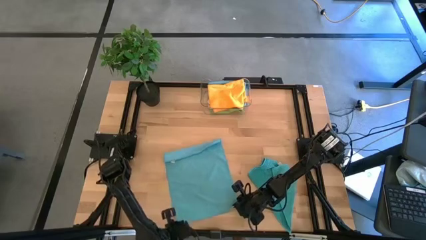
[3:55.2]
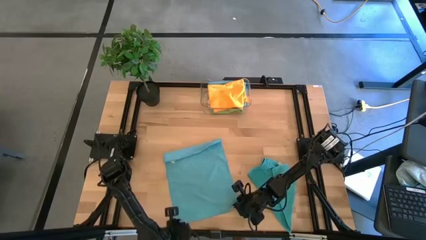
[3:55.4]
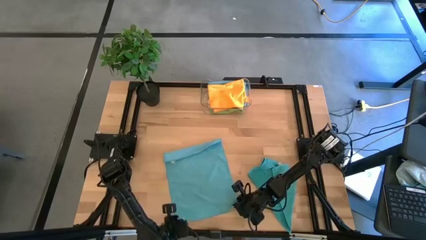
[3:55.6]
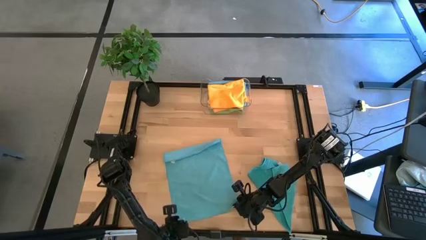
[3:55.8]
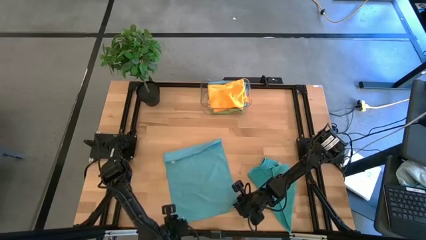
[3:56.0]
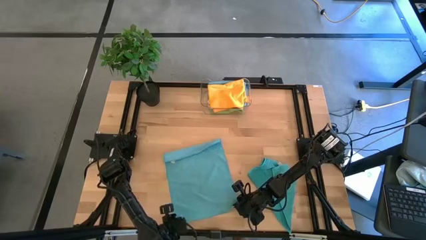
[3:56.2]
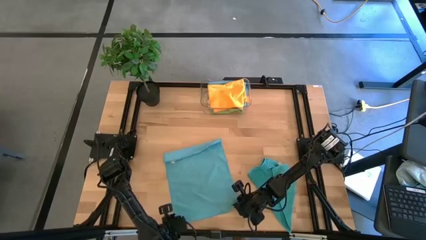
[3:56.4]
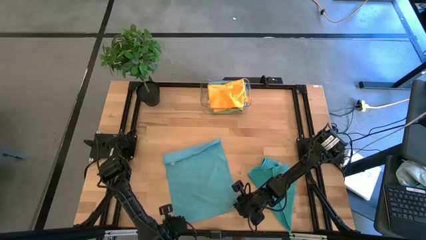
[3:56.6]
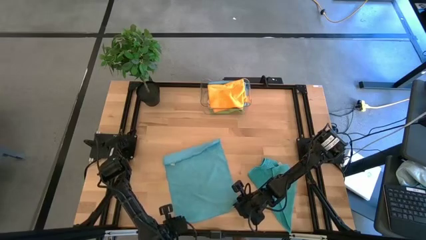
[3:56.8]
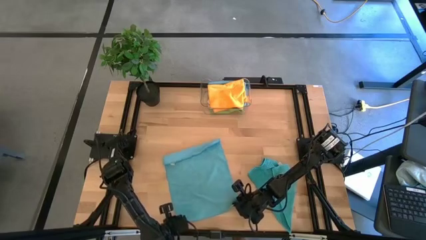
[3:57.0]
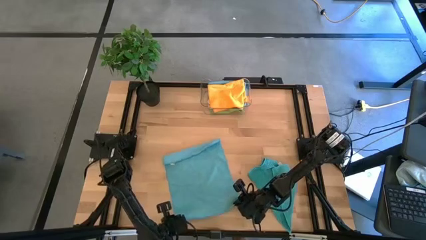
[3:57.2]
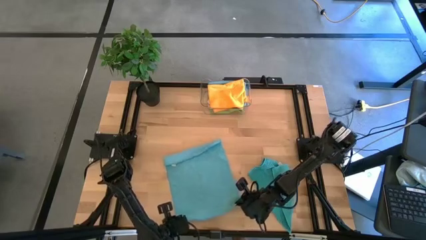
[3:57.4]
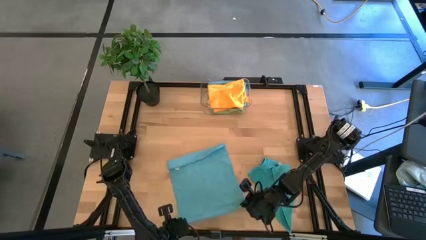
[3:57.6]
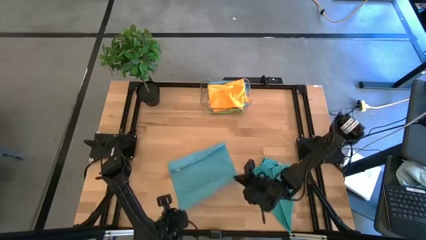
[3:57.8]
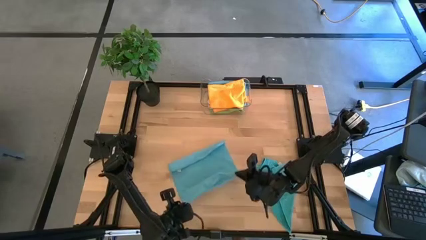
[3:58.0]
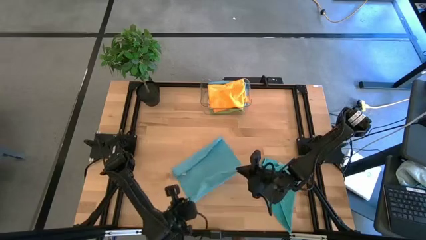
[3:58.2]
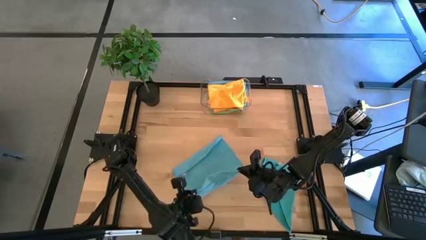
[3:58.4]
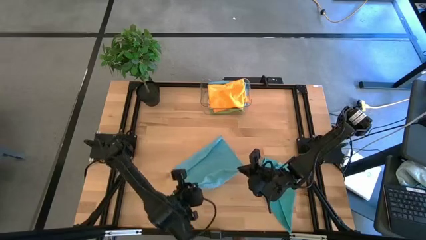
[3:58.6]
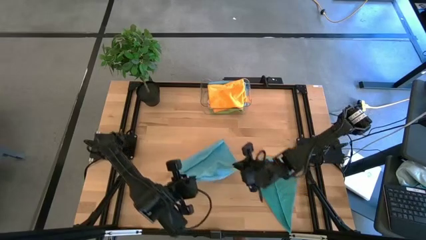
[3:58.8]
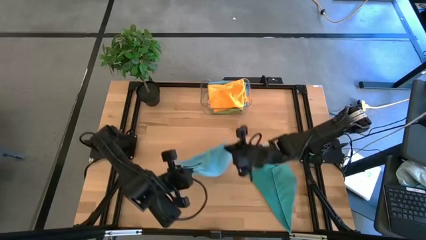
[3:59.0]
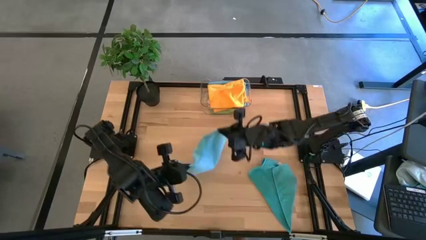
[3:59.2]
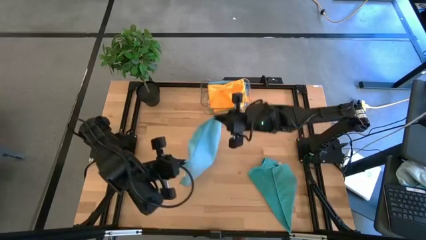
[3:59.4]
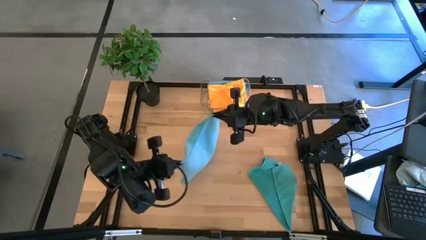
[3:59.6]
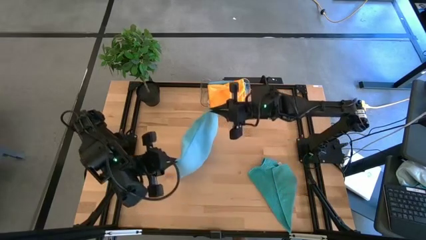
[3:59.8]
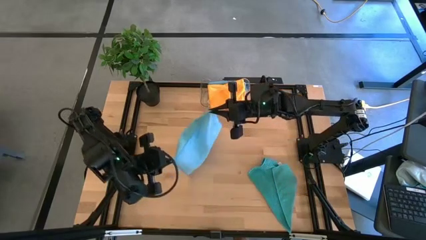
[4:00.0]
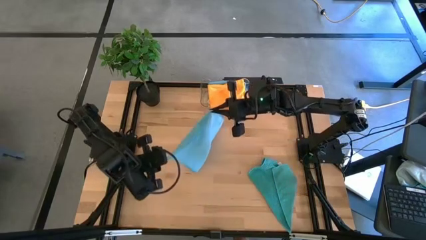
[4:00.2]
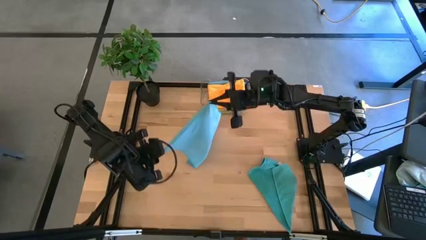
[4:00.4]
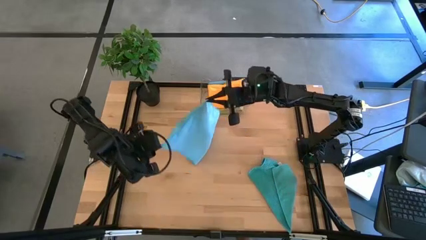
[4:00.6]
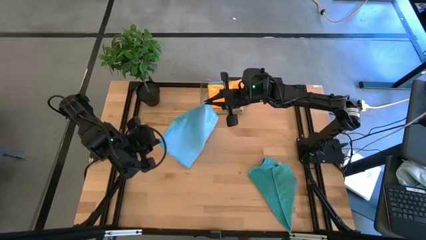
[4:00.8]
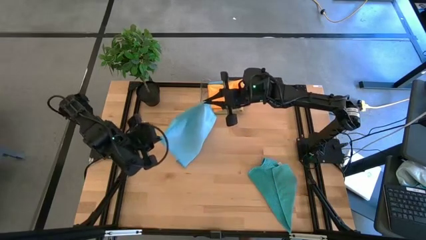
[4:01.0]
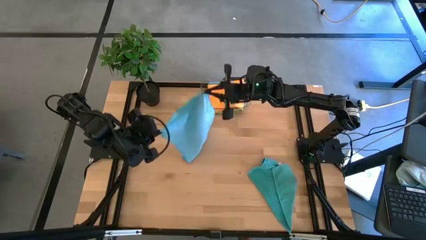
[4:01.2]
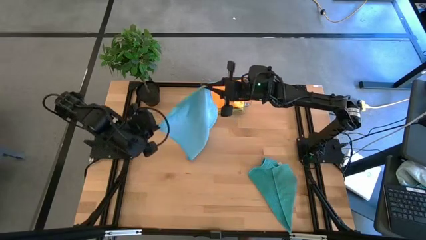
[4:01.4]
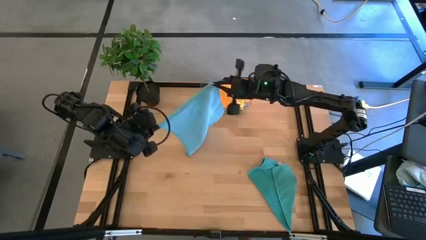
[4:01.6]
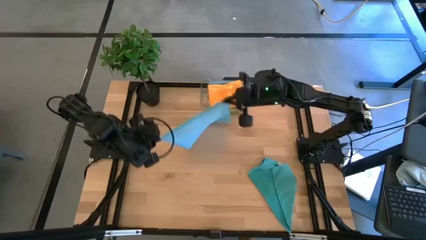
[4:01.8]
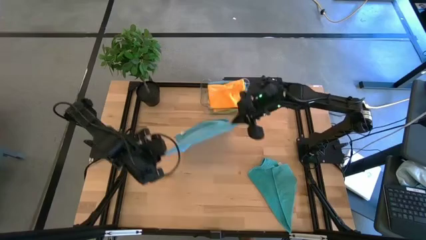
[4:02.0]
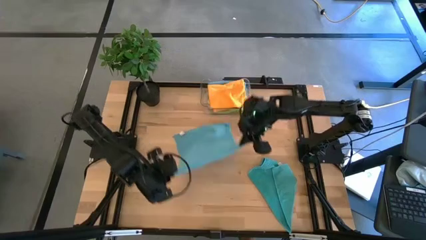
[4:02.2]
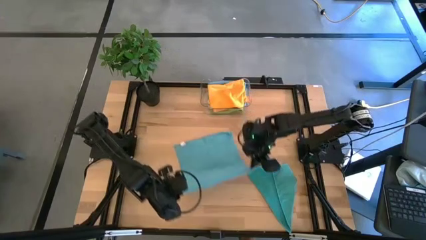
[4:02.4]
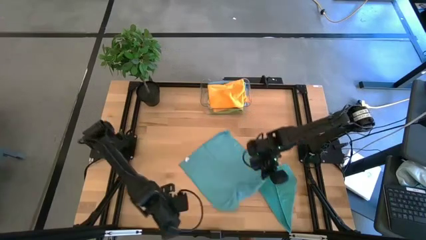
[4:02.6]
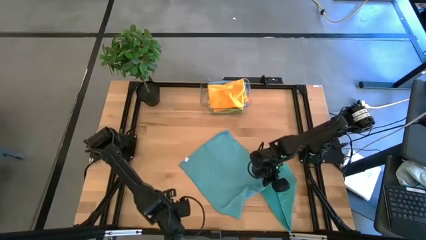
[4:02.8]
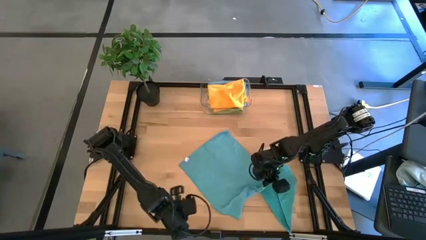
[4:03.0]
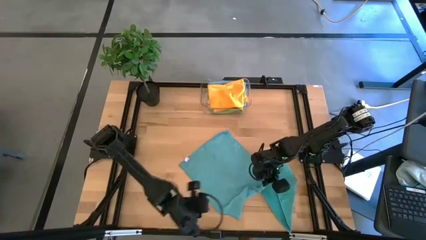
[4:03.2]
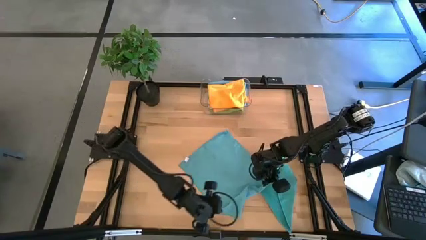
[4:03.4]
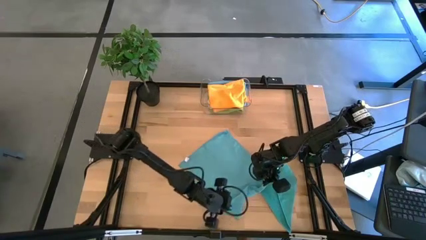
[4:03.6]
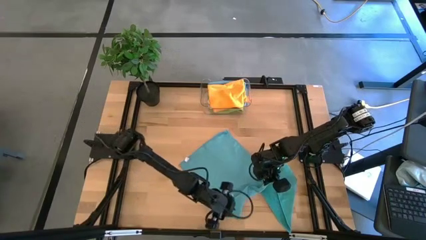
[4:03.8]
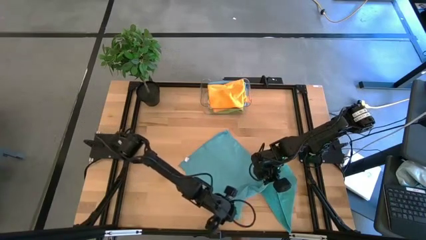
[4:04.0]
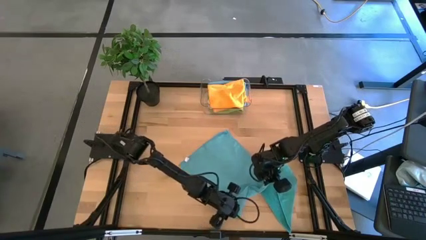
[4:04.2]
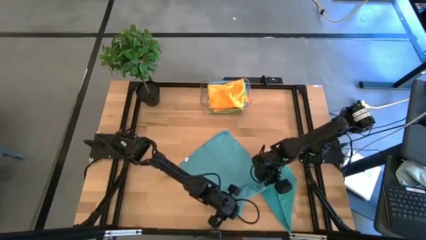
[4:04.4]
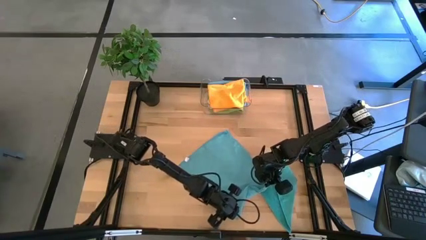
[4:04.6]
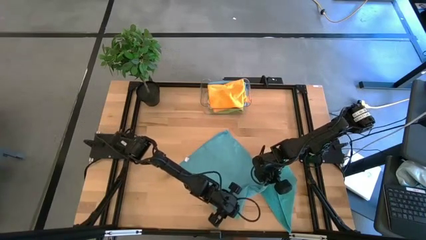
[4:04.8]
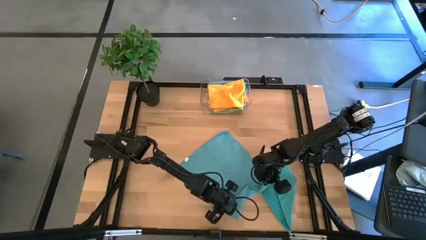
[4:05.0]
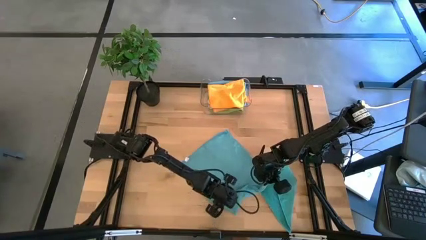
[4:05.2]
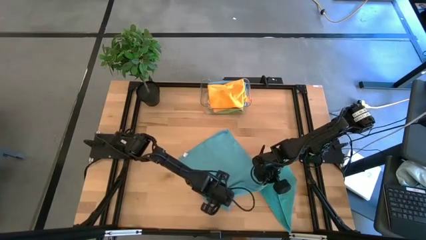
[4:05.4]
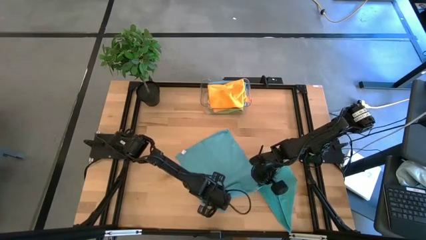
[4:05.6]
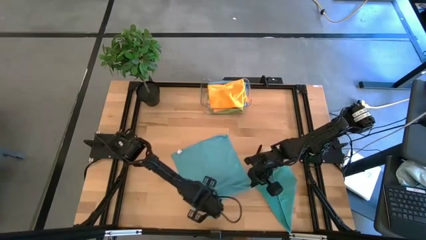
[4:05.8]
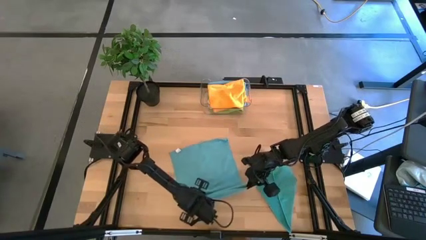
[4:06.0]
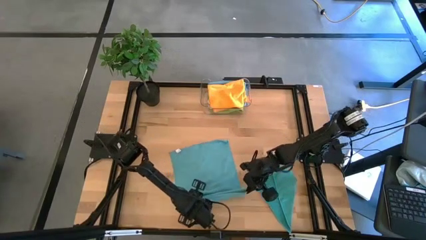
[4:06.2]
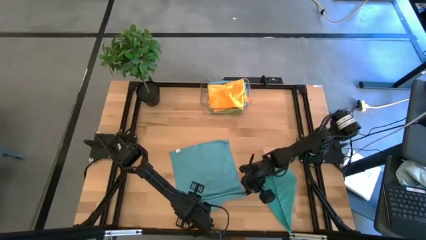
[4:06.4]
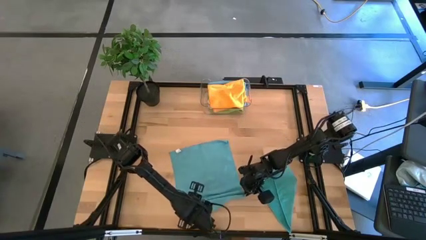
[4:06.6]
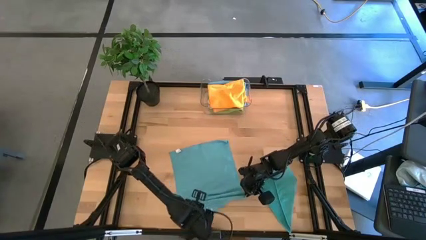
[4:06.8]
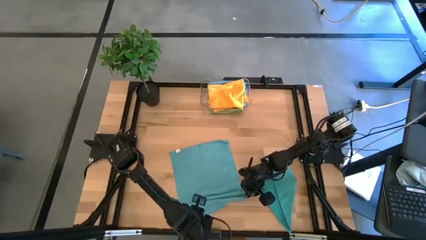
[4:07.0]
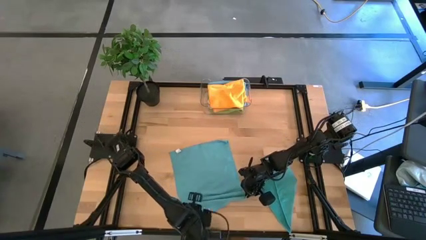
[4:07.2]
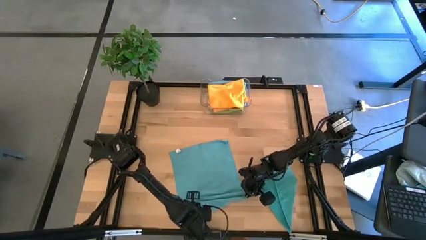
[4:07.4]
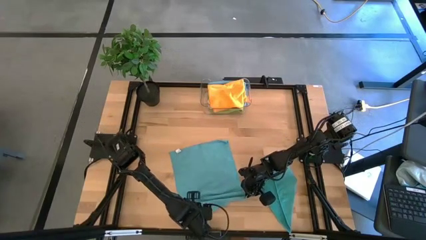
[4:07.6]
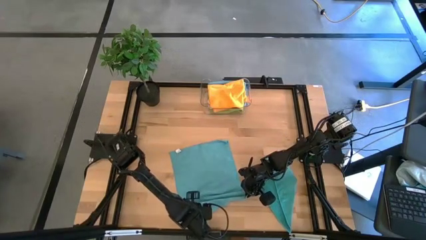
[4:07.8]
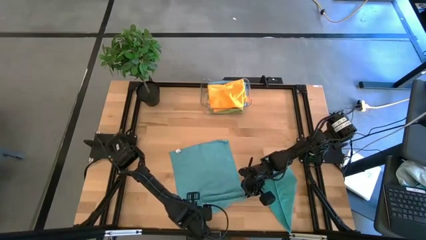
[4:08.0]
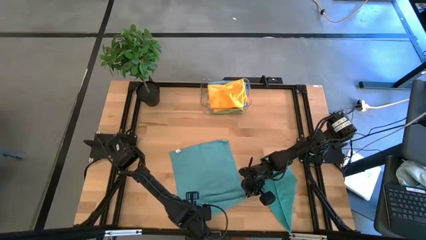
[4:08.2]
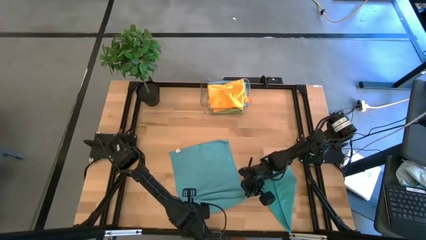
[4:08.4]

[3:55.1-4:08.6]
Task: Fold microfiber towels
Fold the top blue microfiber towel
